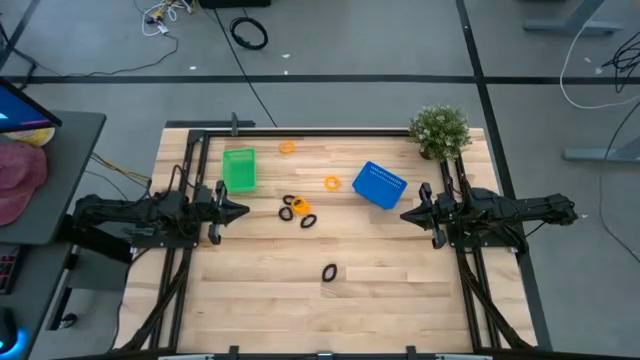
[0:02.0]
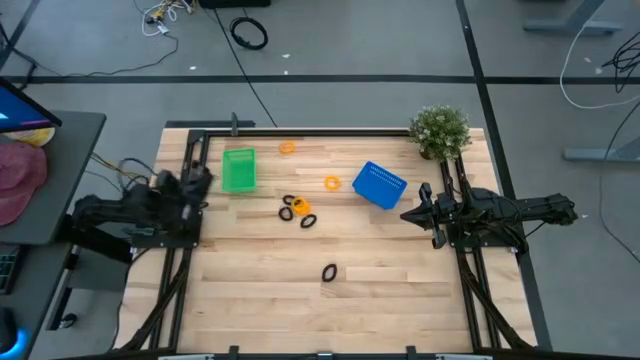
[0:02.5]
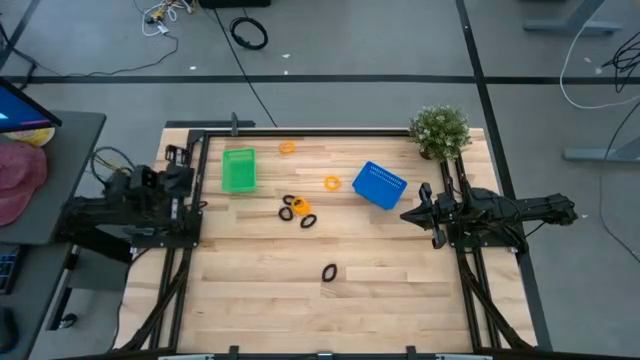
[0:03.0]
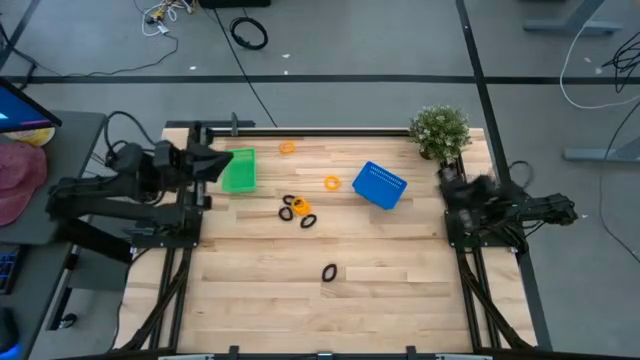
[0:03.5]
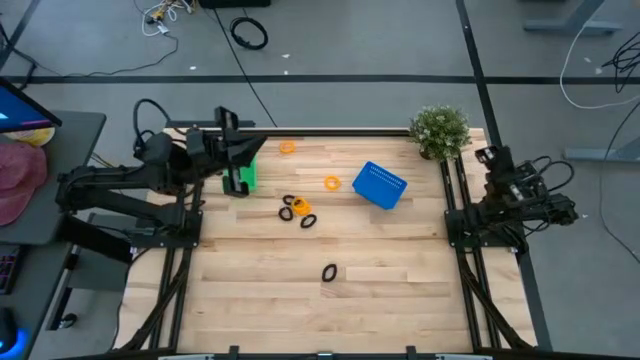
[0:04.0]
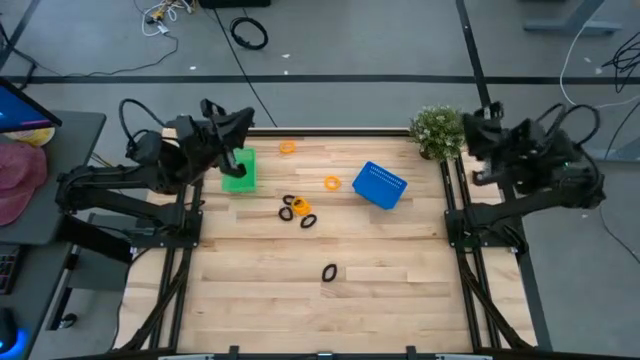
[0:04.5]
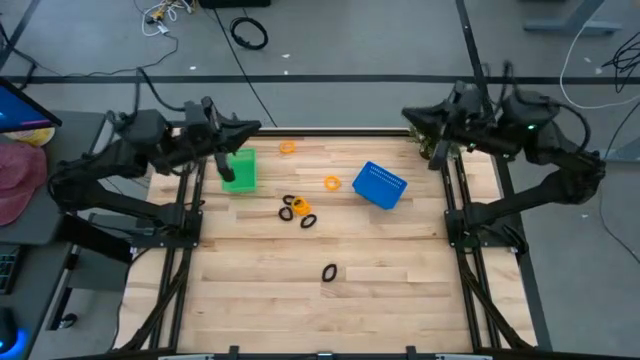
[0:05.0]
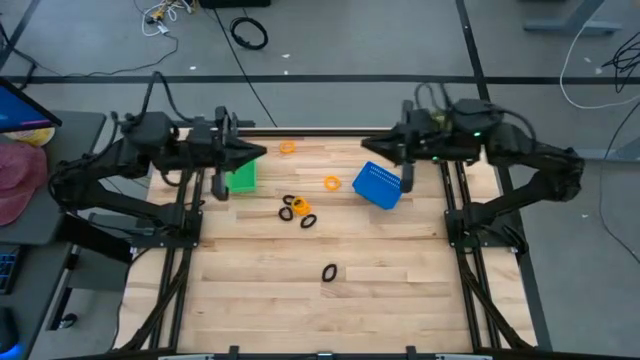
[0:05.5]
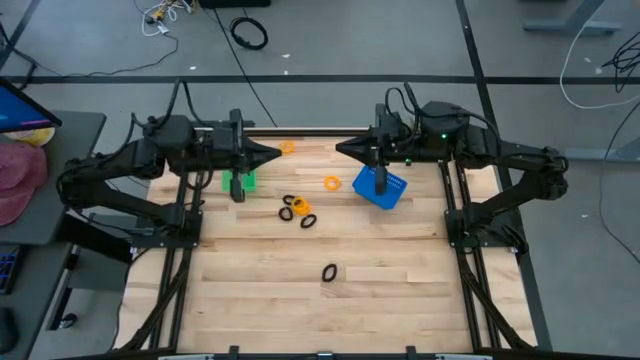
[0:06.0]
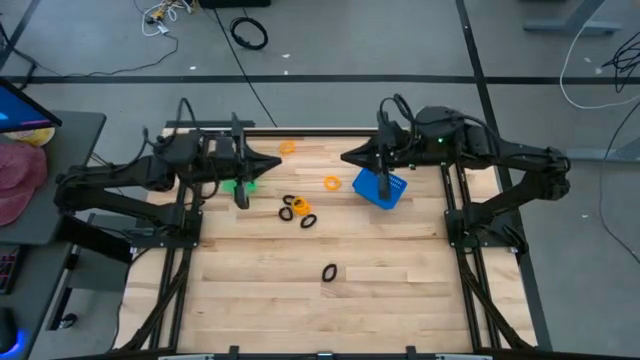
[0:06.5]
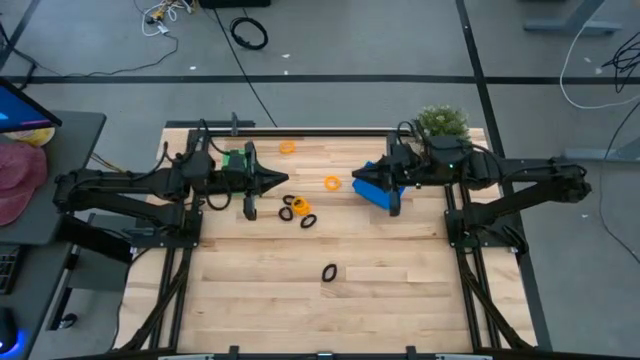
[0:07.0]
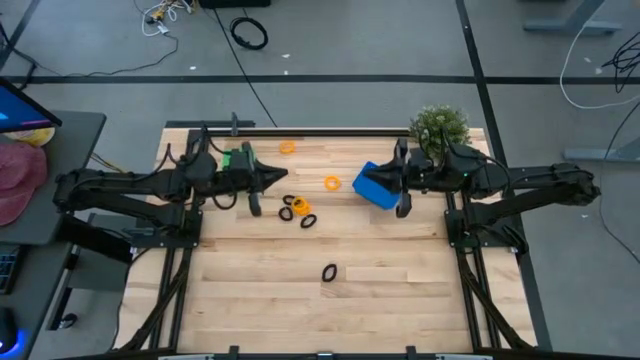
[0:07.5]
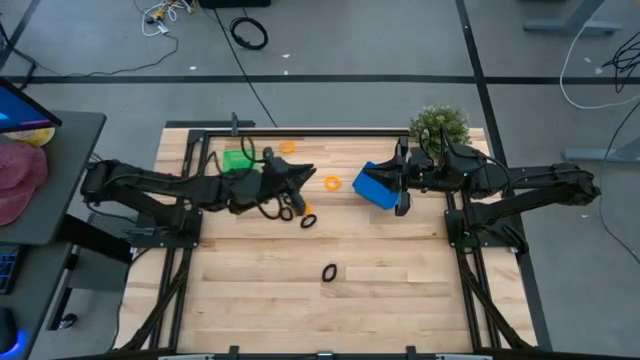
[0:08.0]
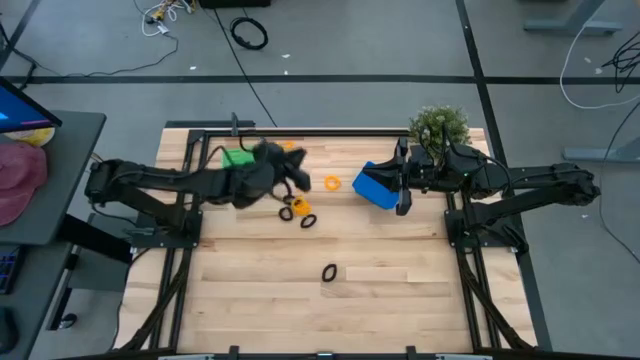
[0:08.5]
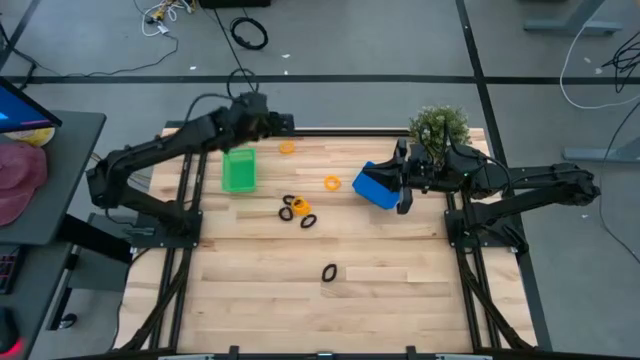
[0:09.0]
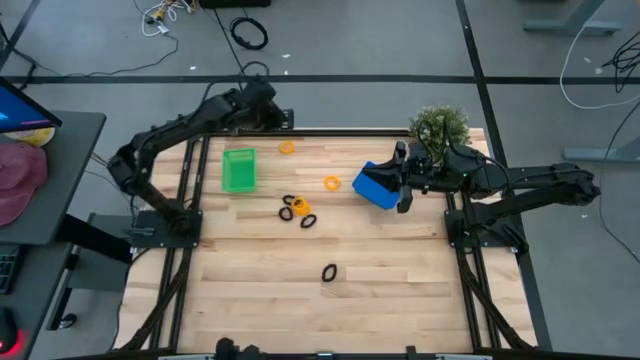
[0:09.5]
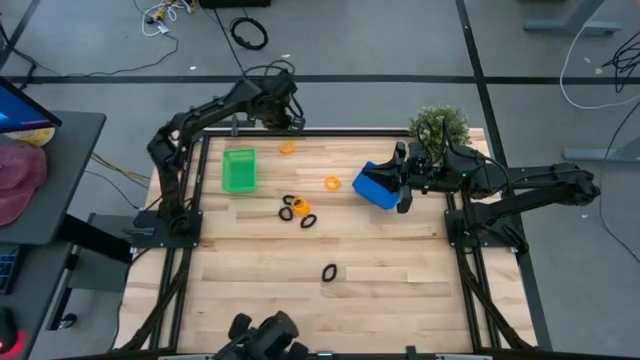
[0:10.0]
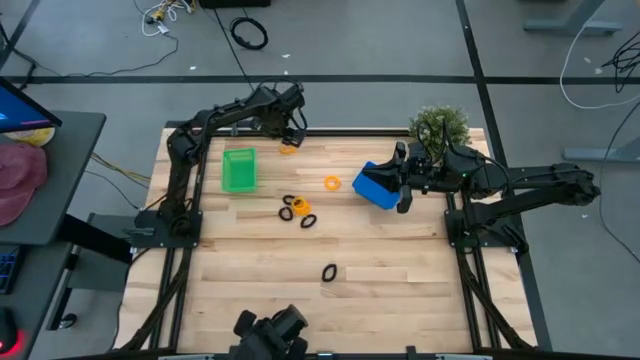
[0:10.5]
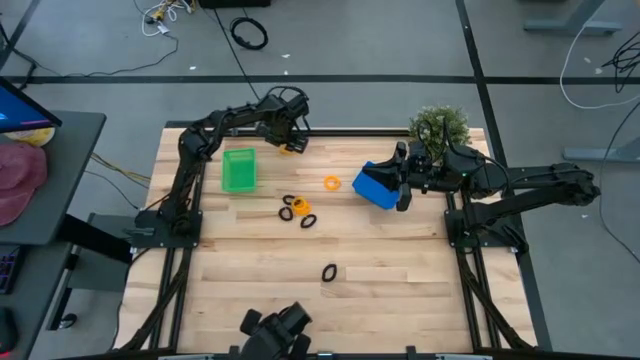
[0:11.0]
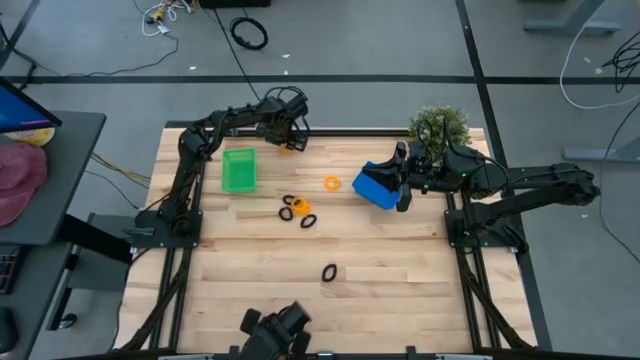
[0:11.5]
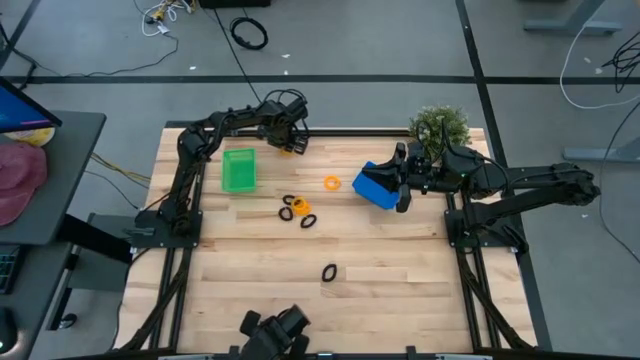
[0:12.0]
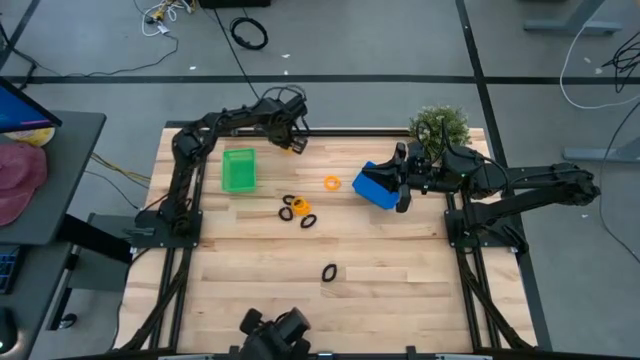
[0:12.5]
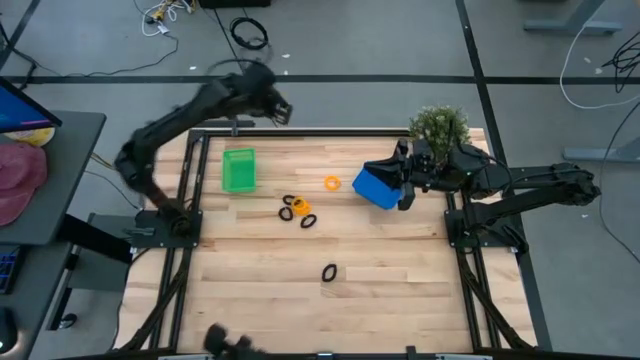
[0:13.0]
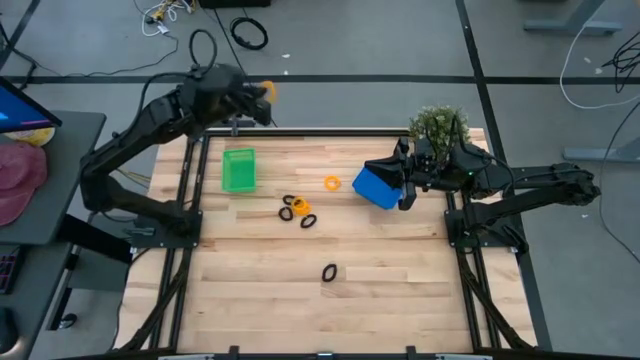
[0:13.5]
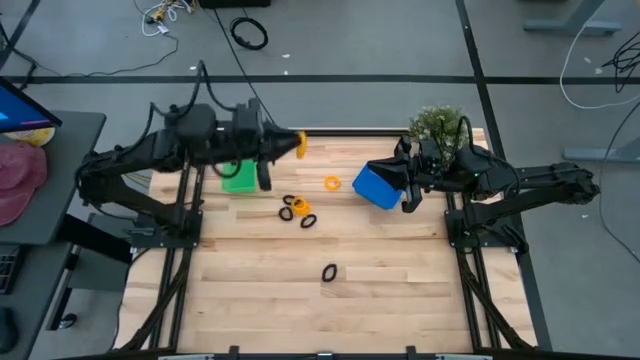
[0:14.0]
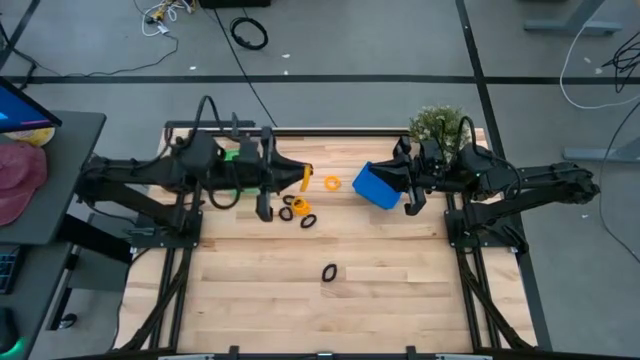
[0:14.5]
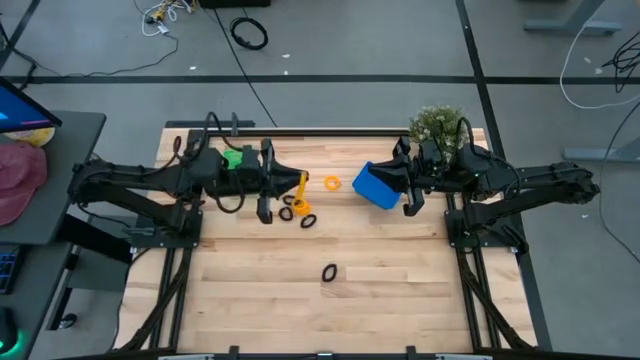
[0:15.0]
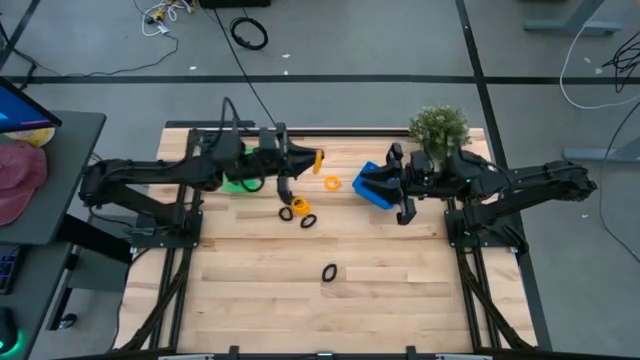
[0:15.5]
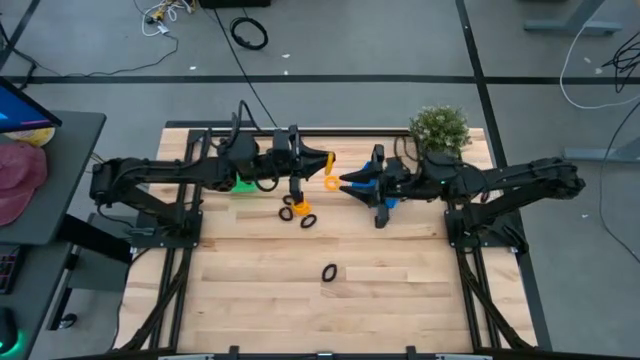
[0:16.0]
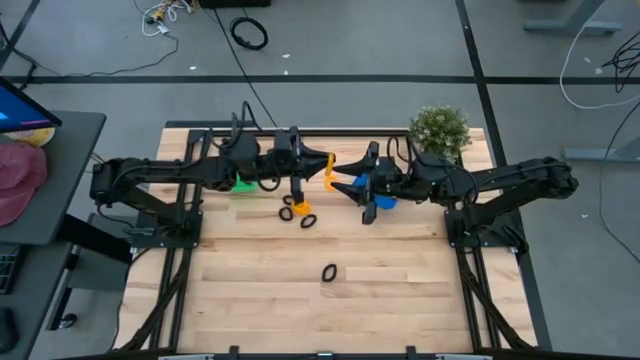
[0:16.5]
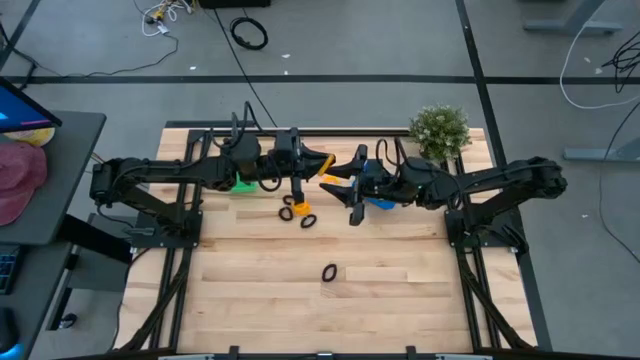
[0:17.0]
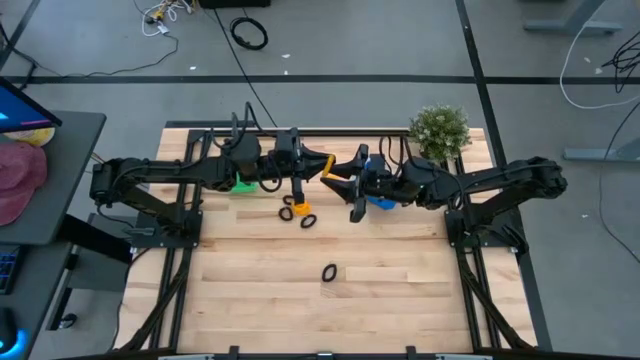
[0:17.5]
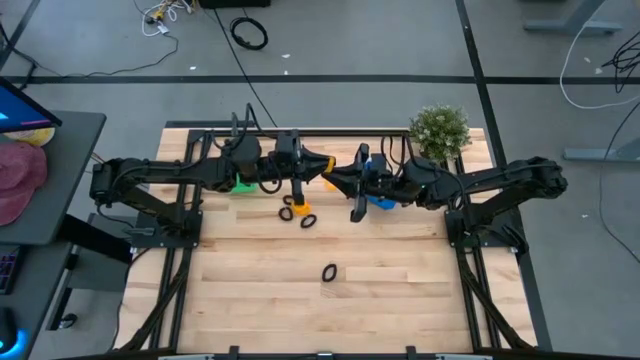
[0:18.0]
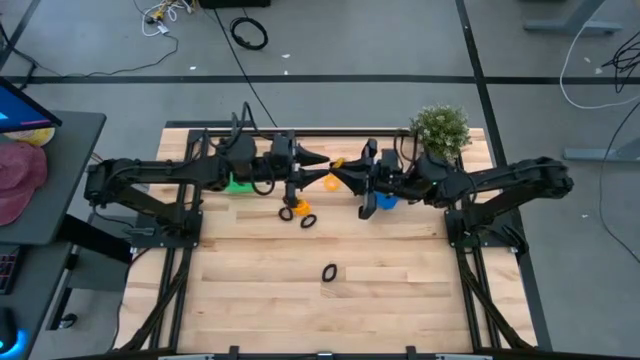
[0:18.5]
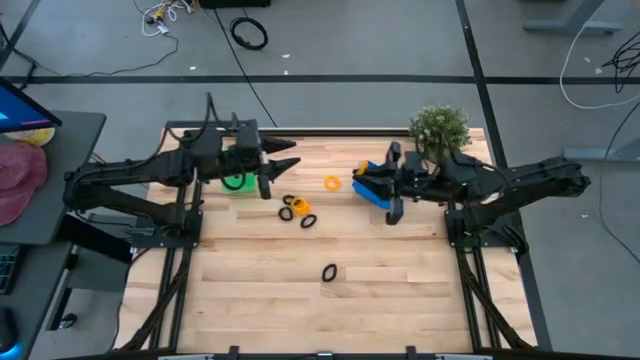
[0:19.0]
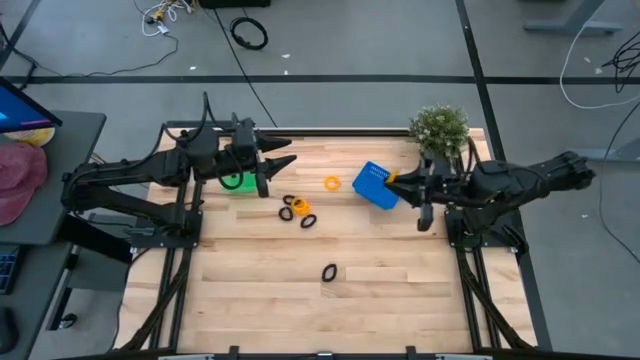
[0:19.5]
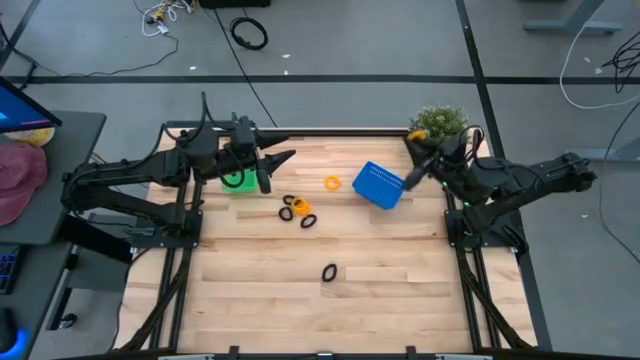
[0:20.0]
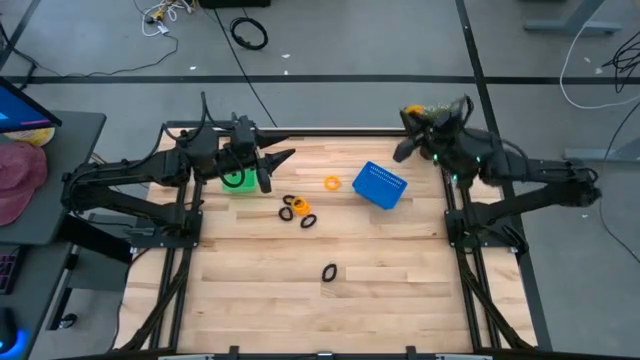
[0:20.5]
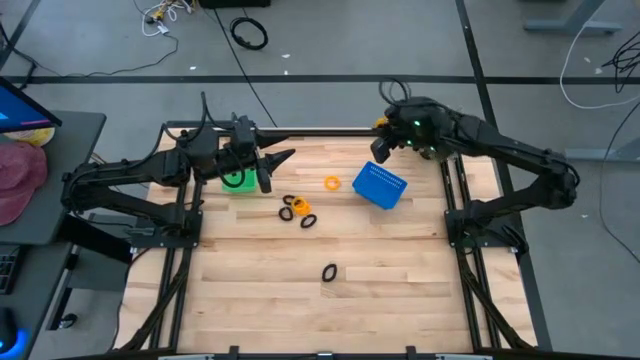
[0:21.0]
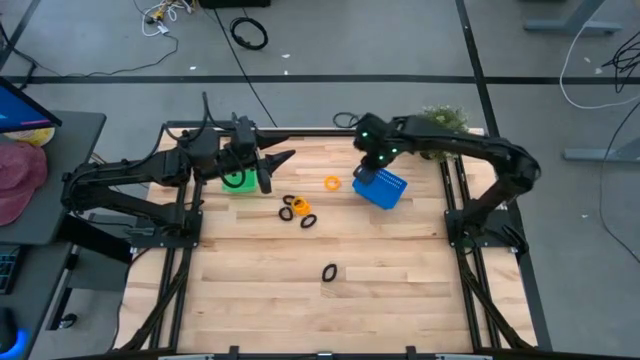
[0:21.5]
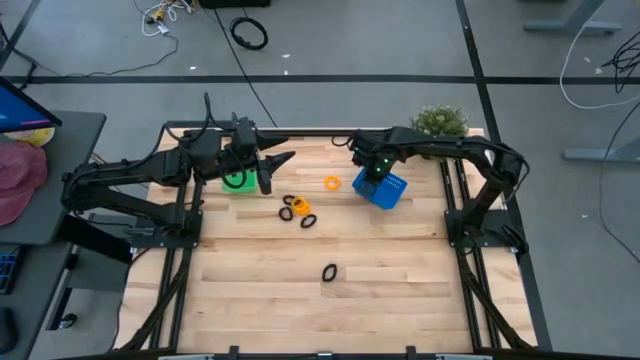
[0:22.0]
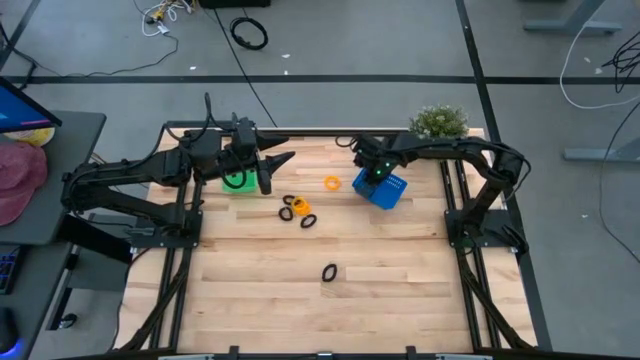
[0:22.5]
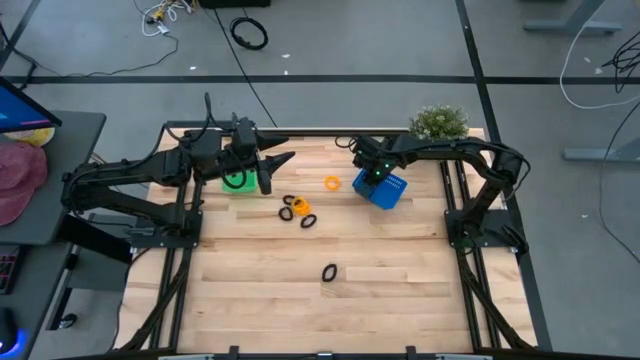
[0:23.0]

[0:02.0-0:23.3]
Task: Sort spring keychains
Put the yellow spring keychain into the blue bin
